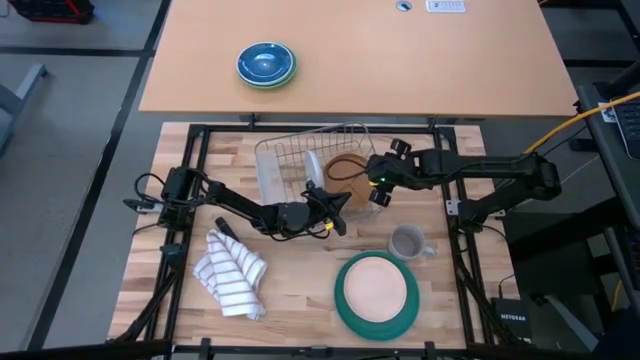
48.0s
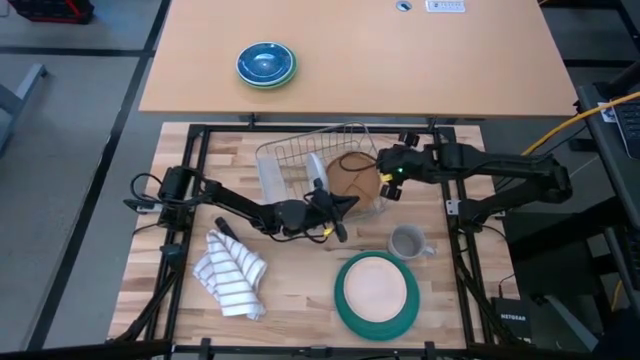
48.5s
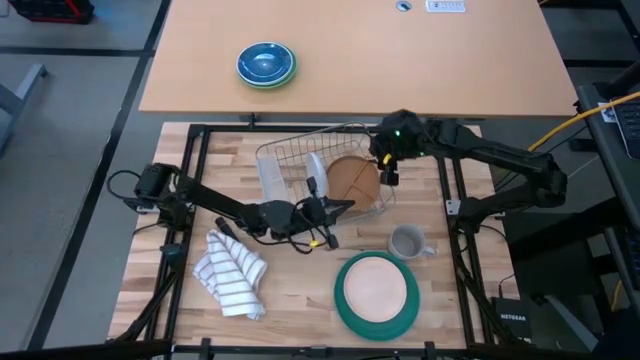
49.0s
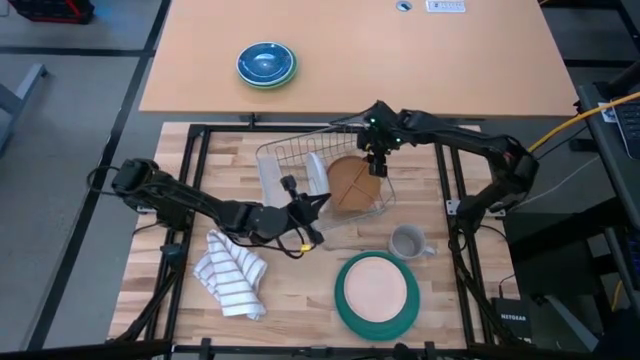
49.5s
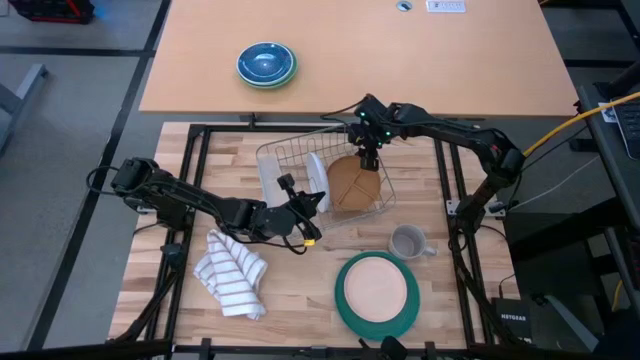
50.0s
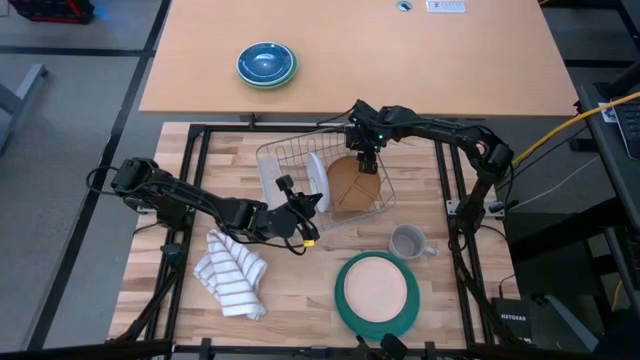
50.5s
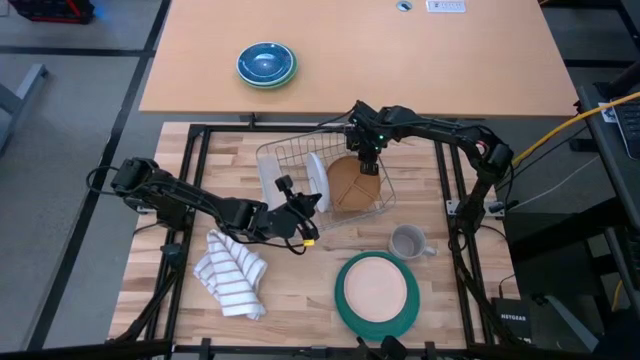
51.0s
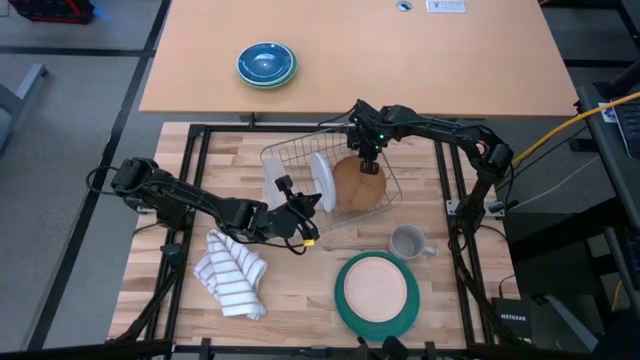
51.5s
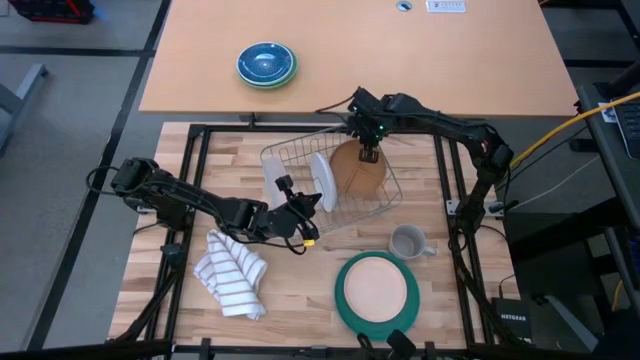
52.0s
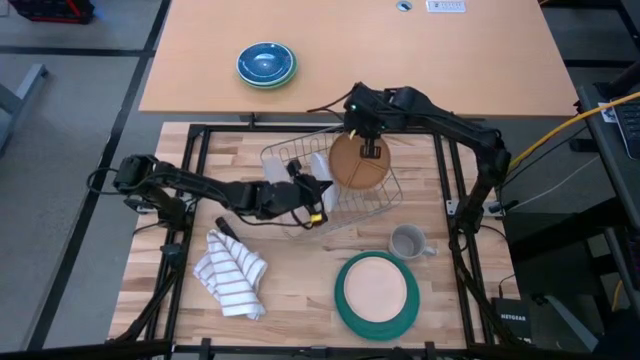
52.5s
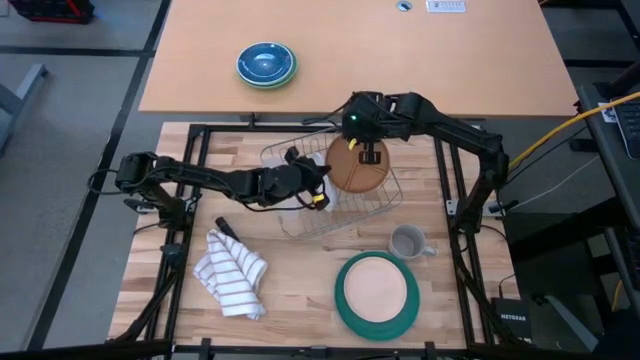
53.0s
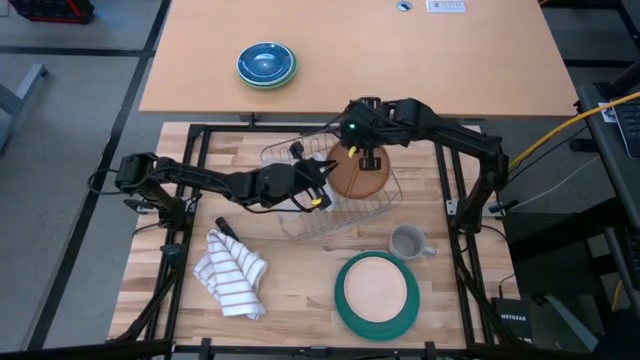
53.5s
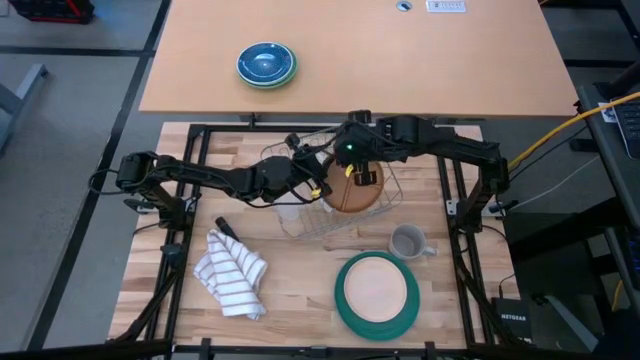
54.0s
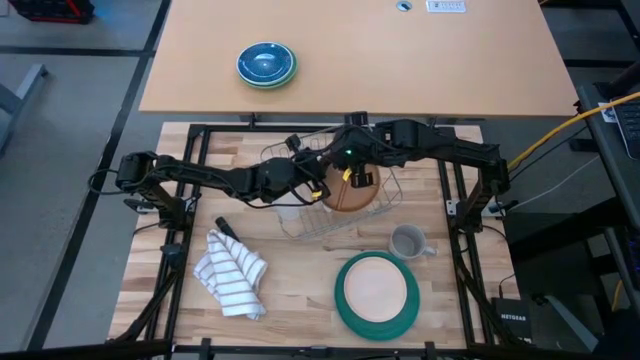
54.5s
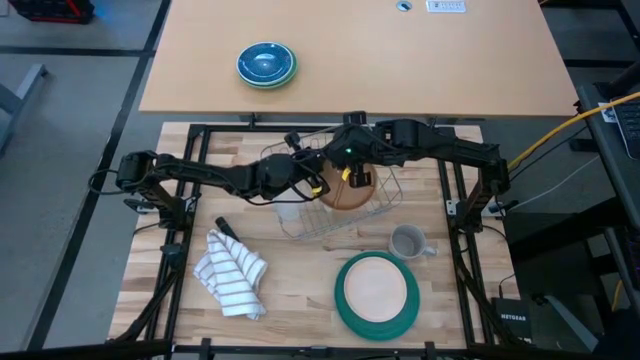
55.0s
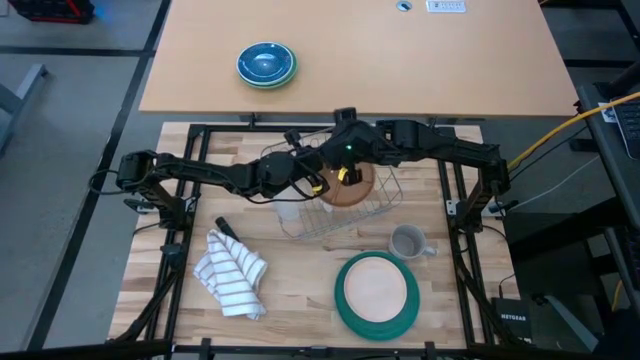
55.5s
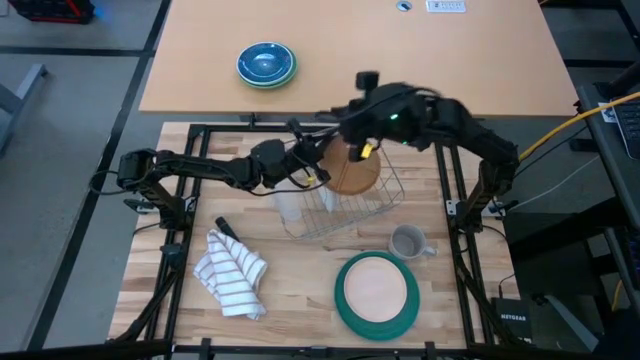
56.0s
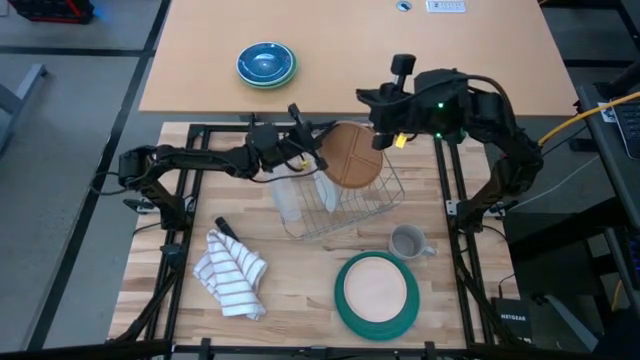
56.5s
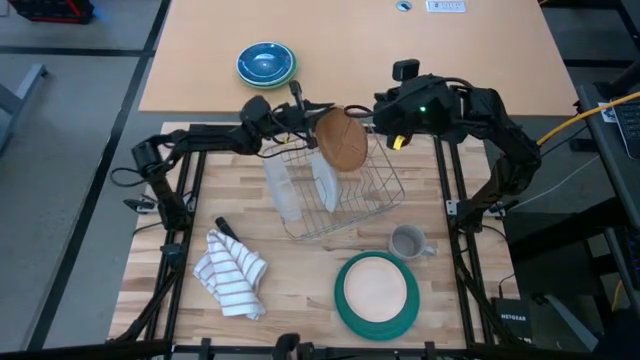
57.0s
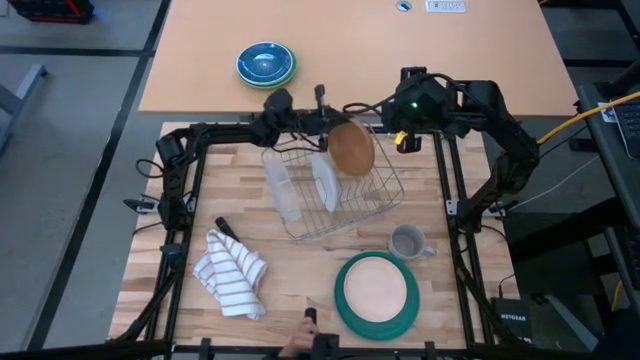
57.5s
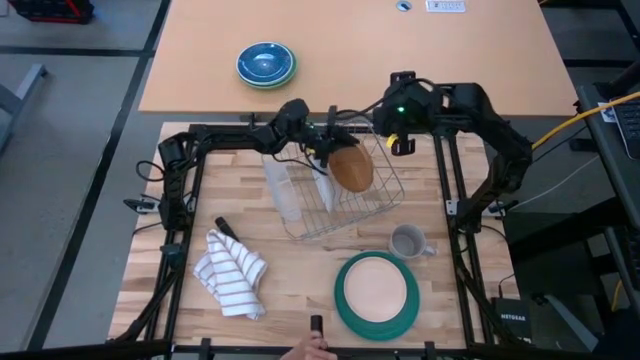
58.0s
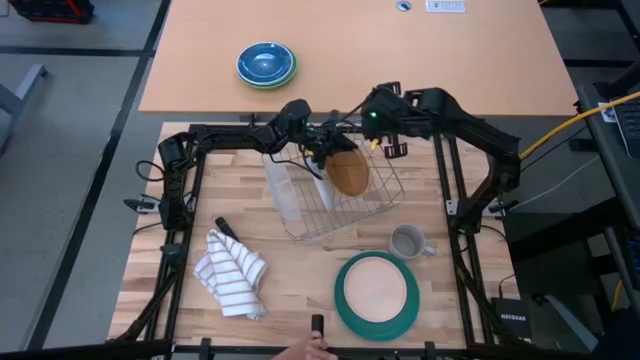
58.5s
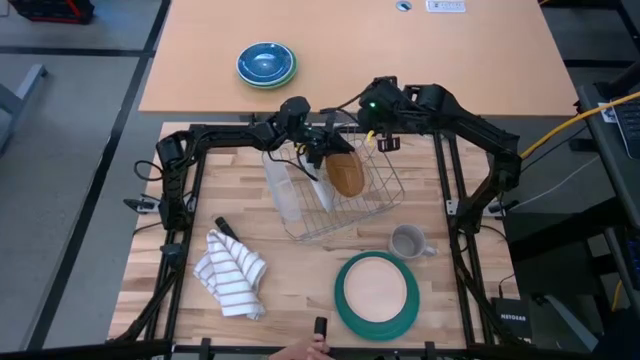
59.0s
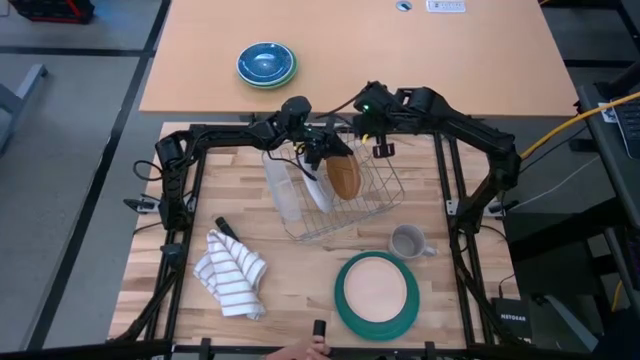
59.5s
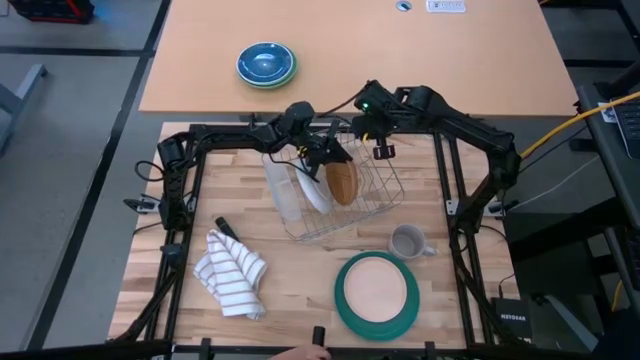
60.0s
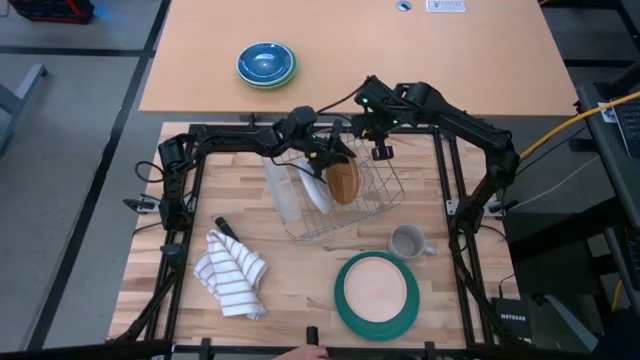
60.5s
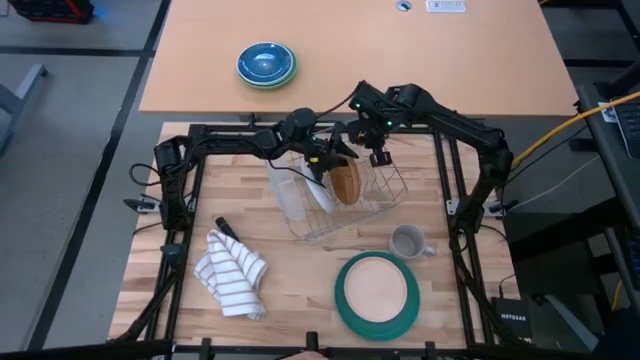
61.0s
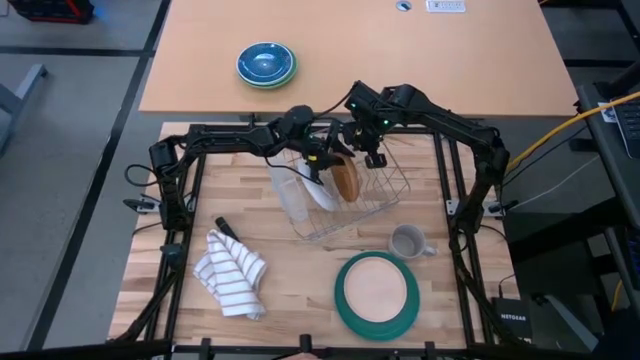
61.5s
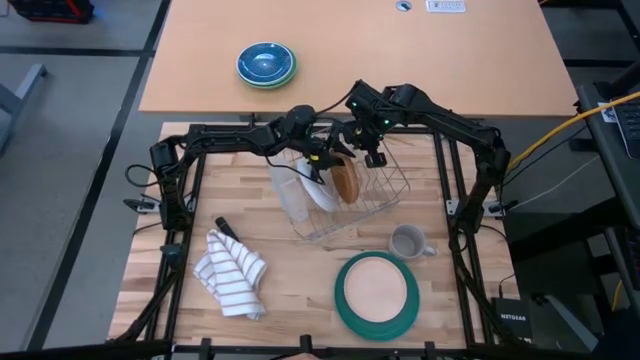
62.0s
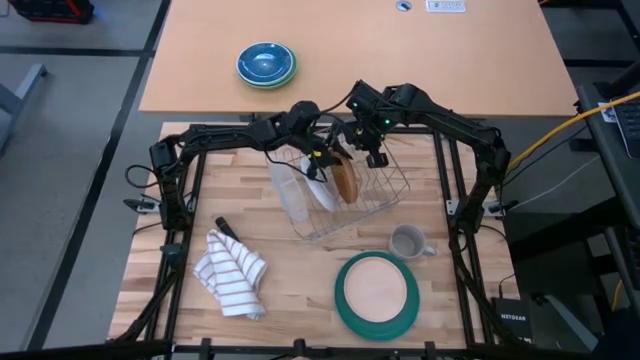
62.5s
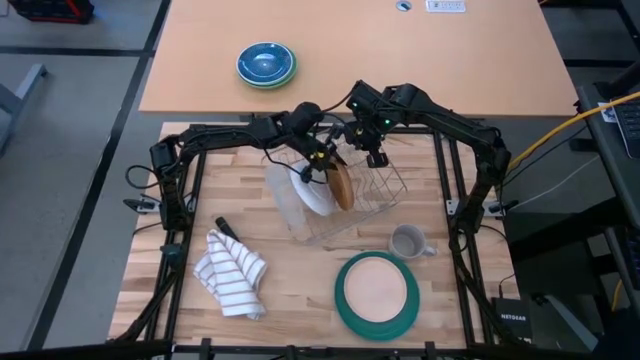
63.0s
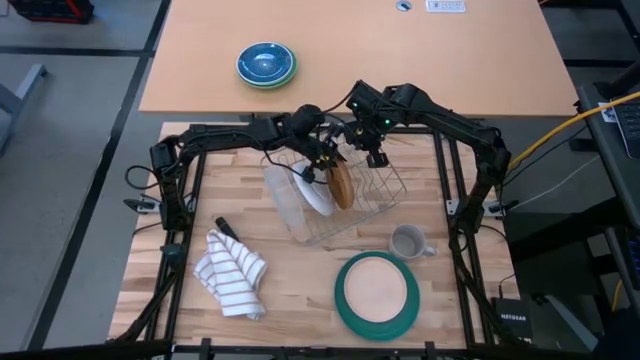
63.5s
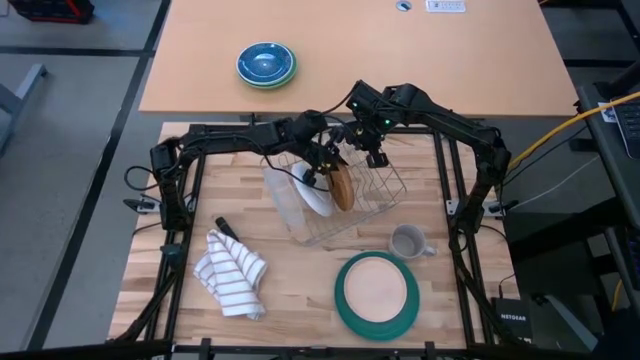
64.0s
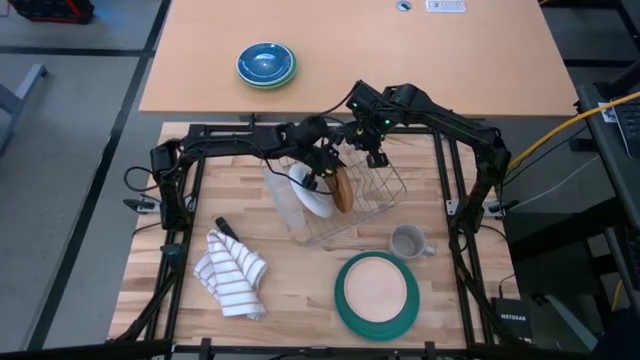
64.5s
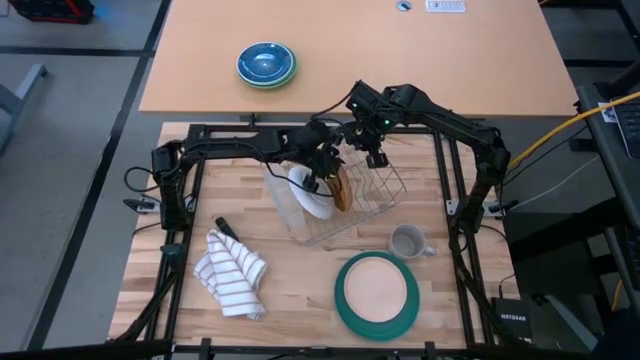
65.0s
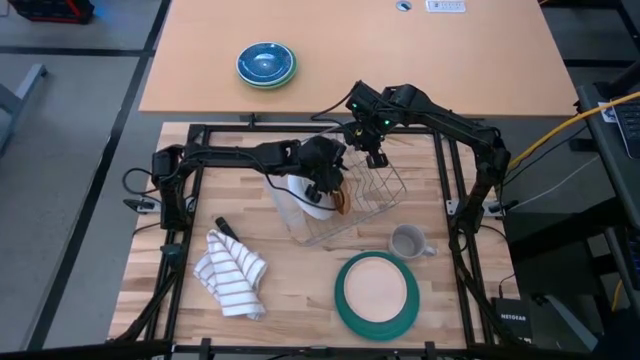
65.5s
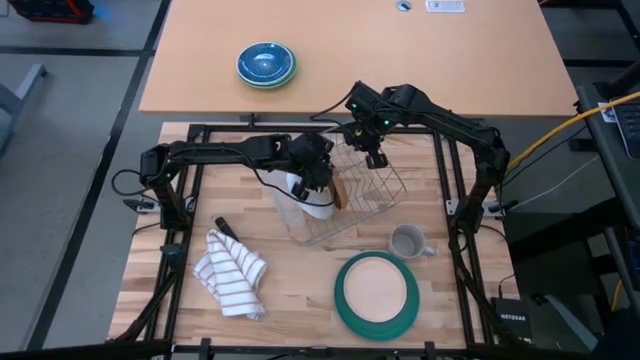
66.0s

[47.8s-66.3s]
Task: Sort dishes
Put the brown plate in the dish rack

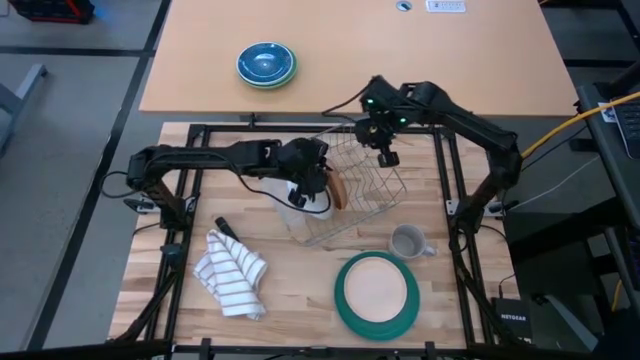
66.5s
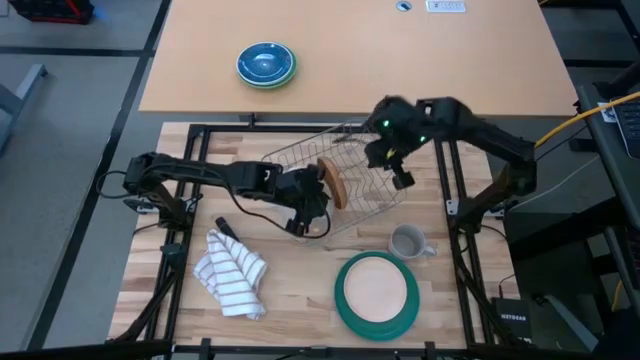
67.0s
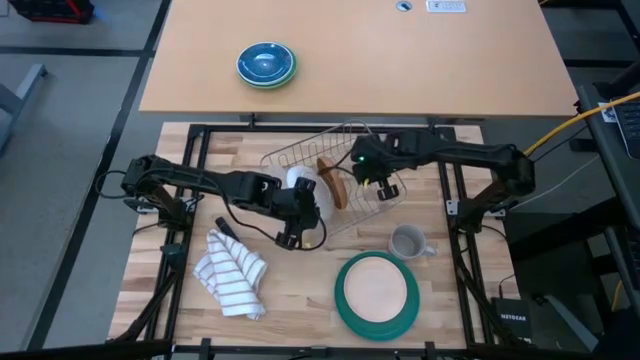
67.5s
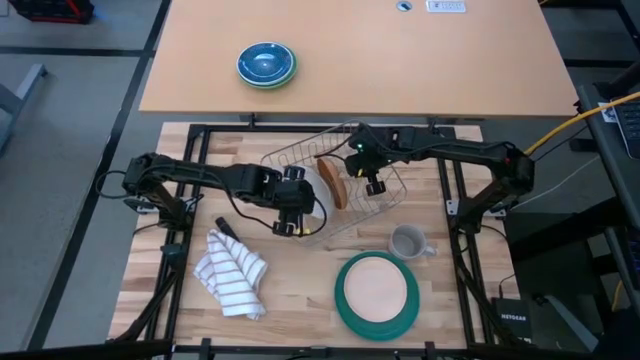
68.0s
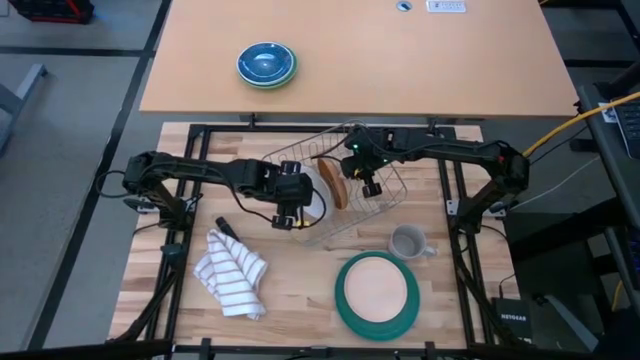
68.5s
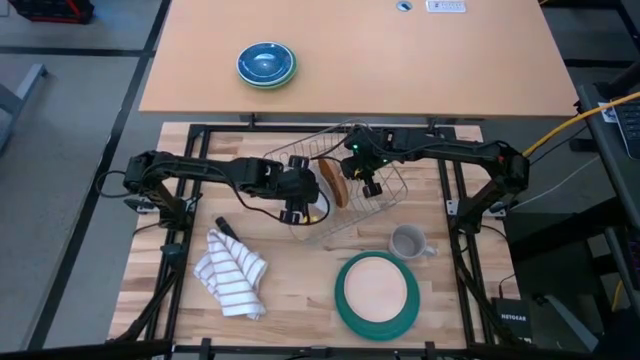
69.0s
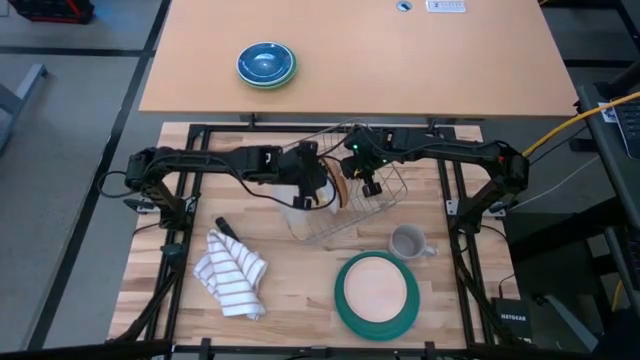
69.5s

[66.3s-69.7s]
Adjust the white plate in the dish rack
